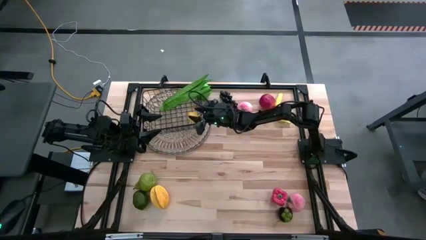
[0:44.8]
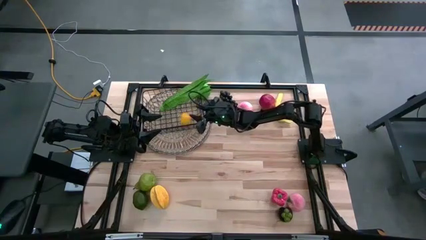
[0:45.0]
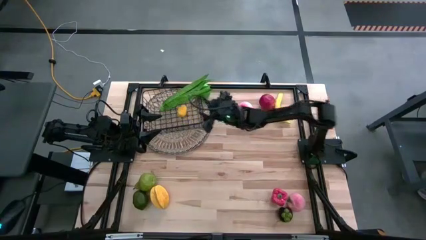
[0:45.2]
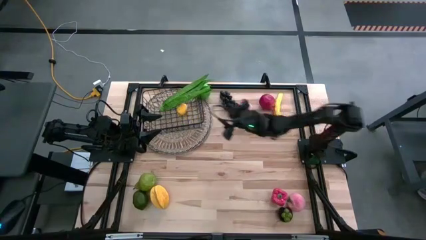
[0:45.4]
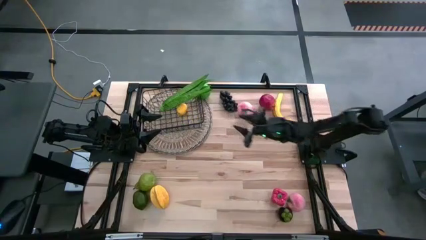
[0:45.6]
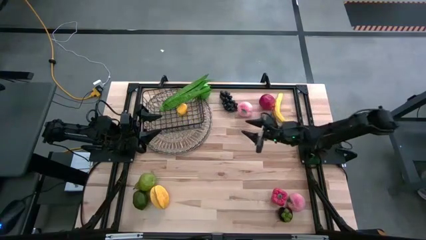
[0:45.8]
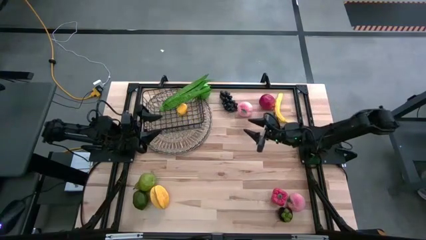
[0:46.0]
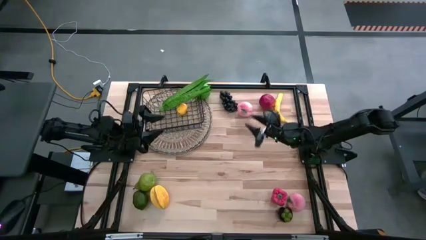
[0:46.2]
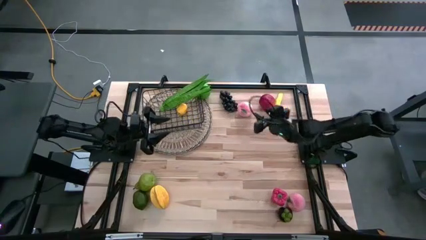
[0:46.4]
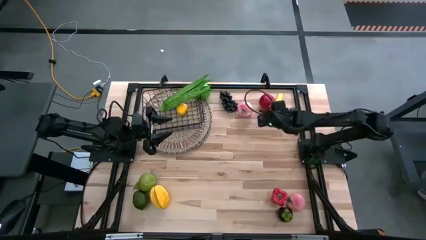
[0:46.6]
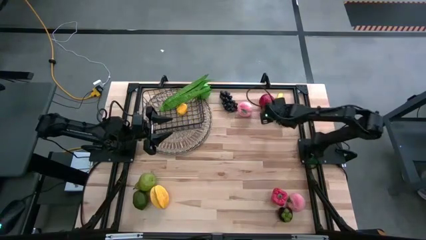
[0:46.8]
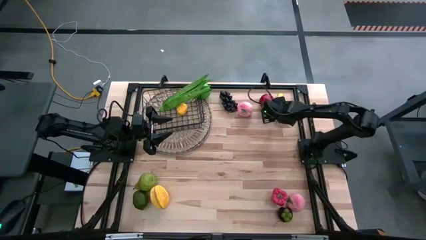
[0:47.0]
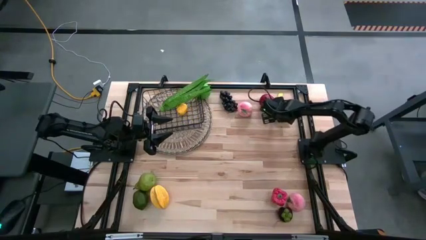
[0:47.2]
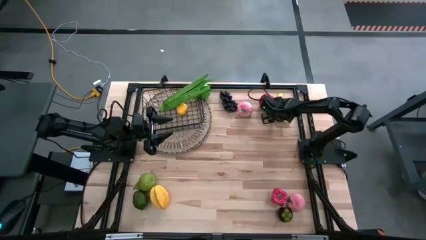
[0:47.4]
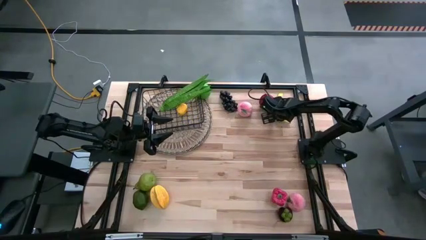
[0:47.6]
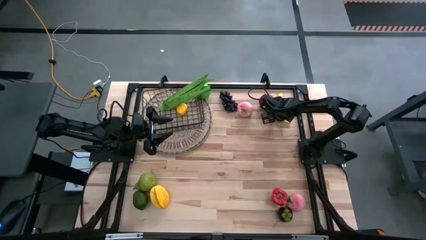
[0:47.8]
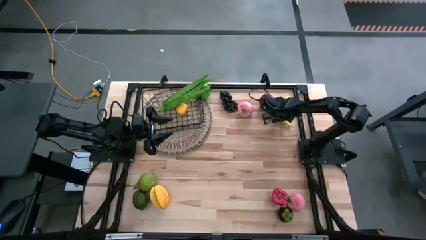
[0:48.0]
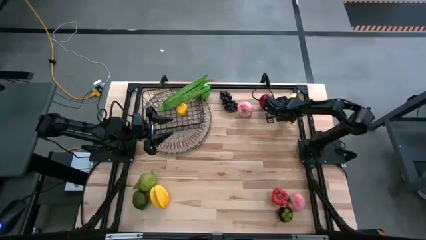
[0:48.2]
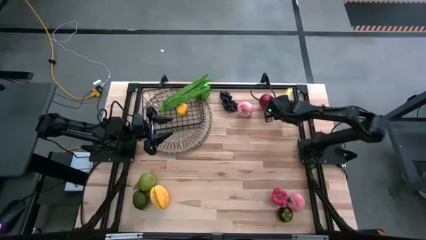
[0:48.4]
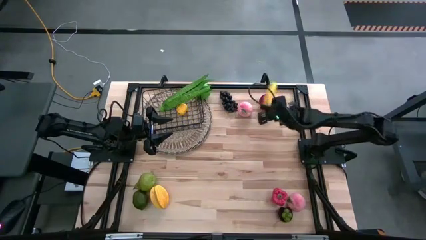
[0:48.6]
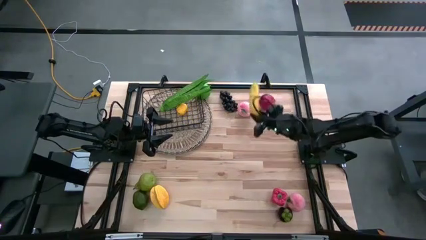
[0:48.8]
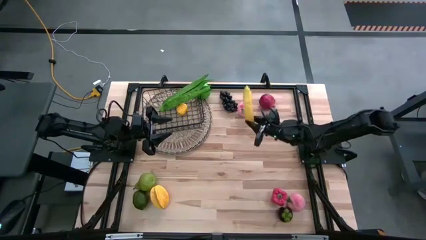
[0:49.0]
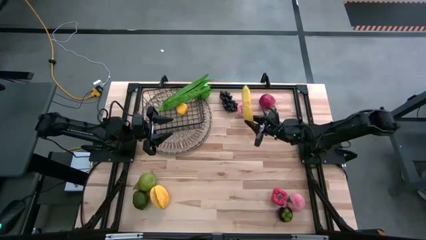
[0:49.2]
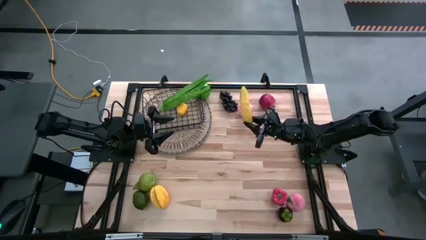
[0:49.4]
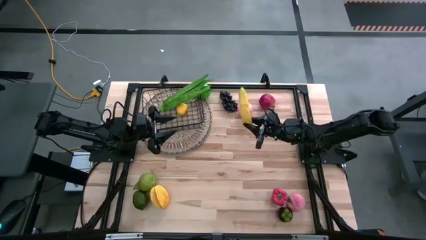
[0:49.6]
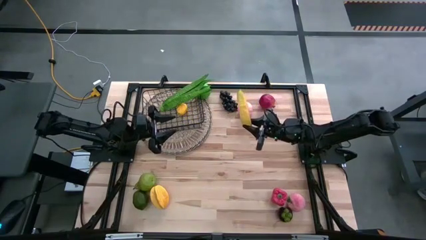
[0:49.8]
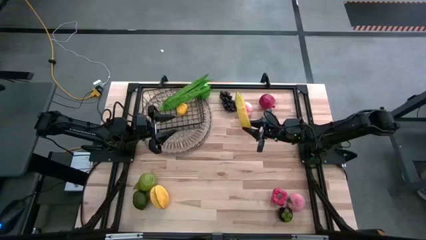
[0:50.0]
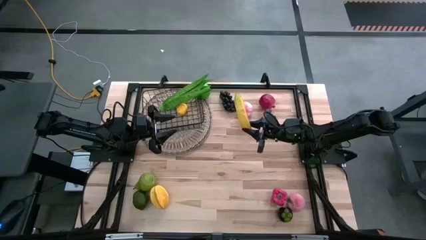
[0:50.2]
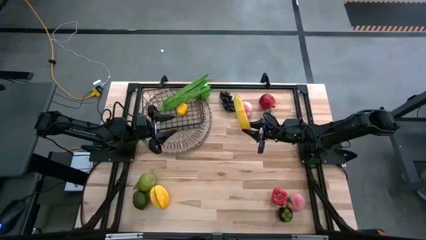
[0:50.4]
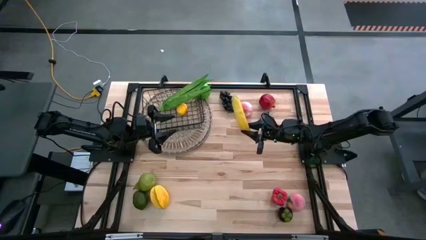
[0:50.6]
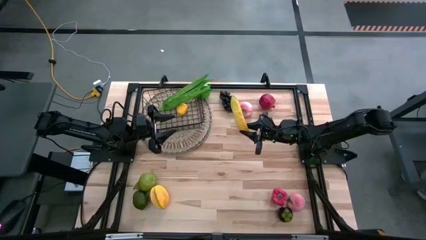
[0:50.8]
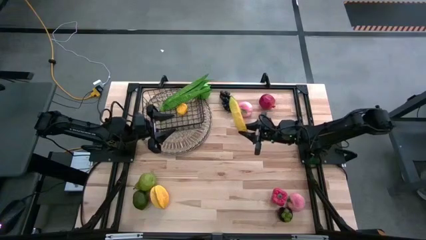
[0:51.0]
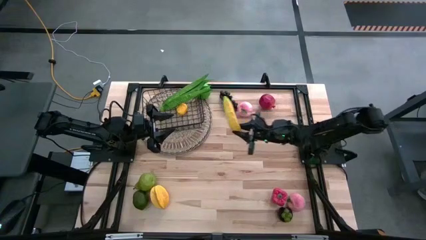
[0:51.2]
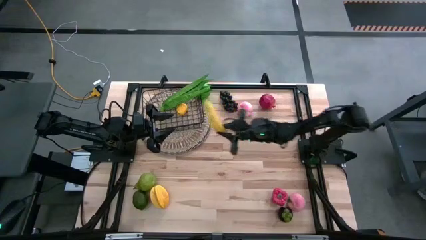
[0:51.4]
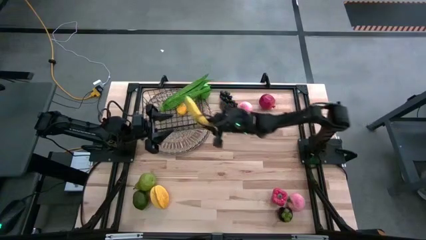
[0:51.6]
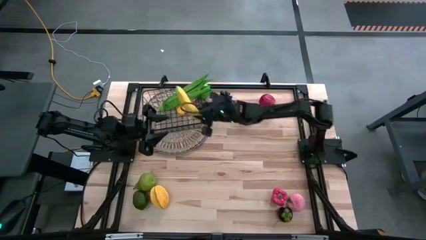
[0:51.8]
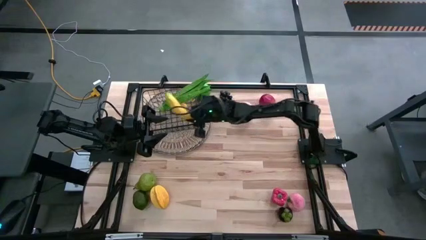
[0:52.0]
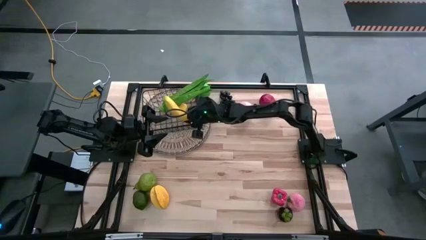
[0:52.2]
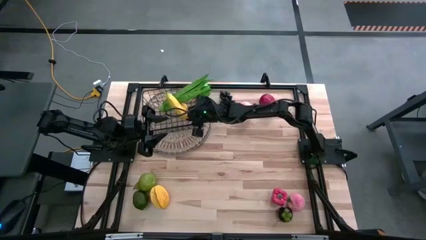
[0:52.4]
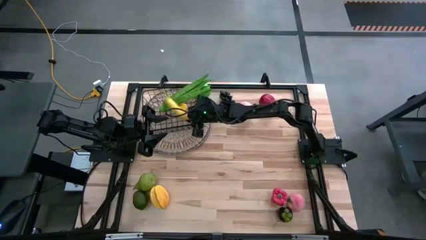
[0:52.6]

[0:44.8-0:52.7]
Task: Build produce basket
Put the yellow banana into the wire basket

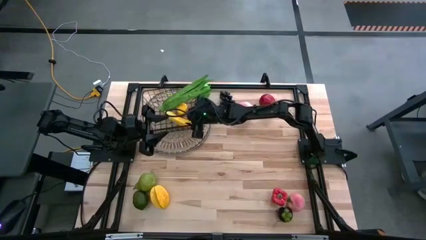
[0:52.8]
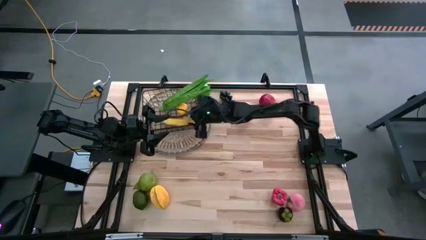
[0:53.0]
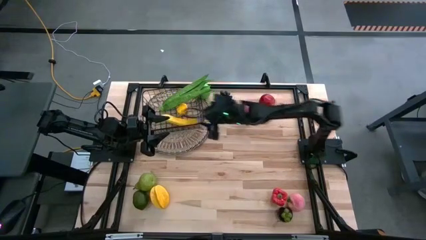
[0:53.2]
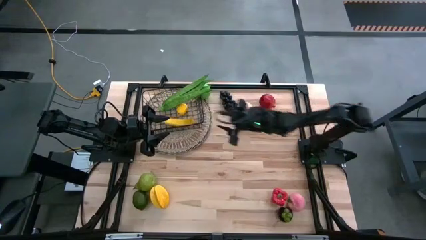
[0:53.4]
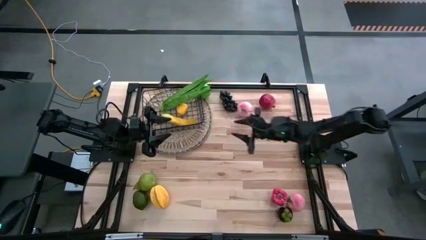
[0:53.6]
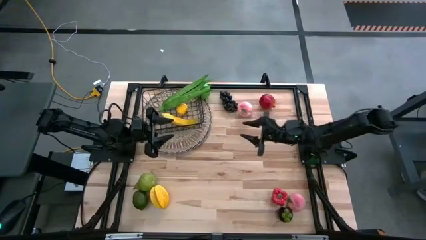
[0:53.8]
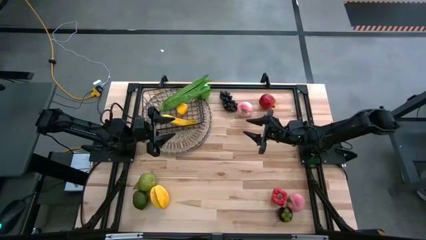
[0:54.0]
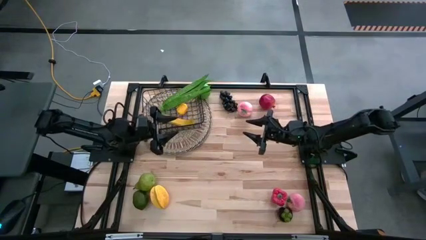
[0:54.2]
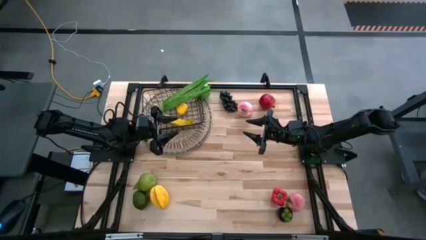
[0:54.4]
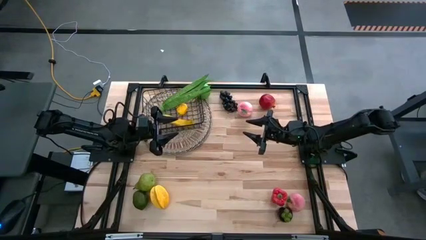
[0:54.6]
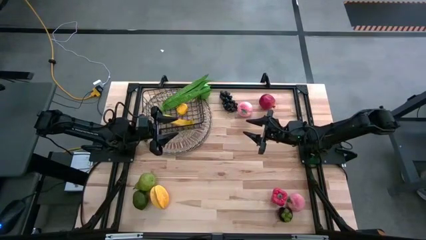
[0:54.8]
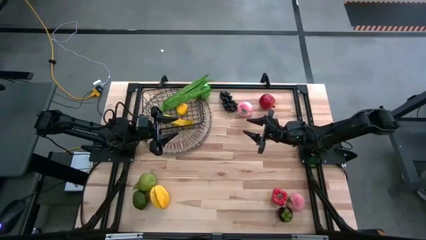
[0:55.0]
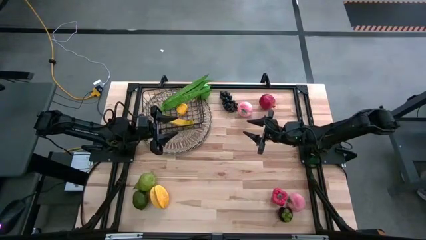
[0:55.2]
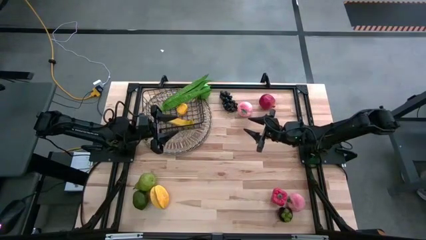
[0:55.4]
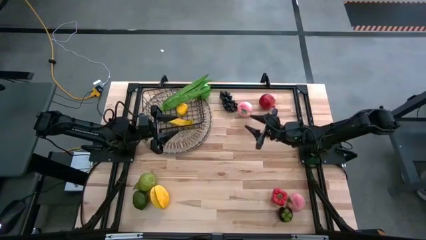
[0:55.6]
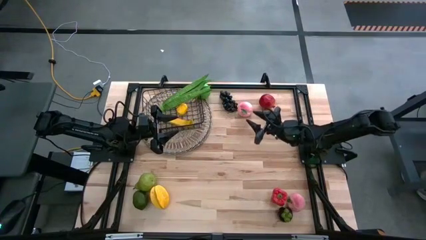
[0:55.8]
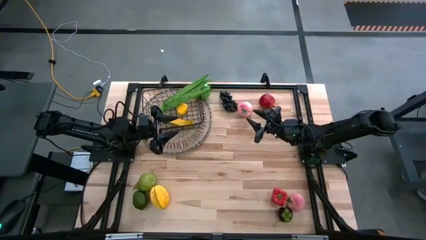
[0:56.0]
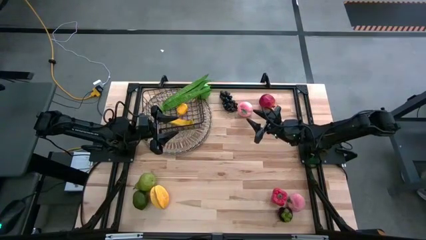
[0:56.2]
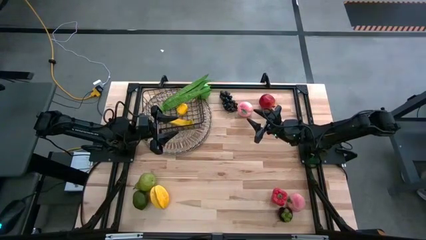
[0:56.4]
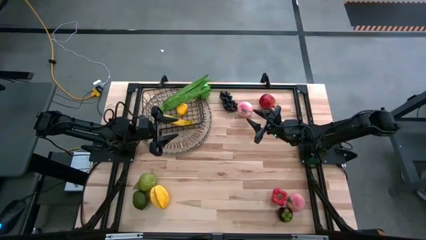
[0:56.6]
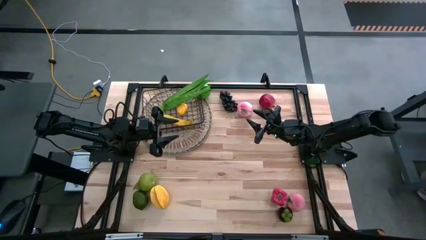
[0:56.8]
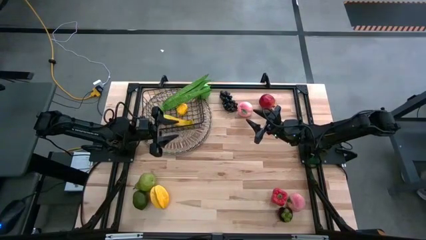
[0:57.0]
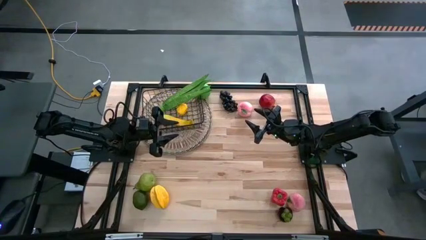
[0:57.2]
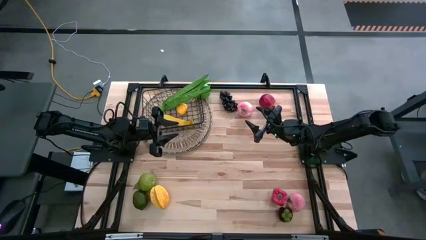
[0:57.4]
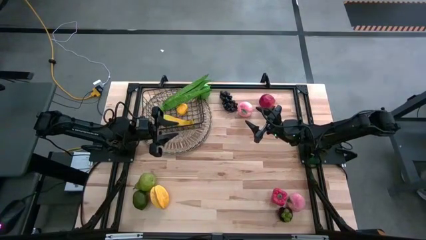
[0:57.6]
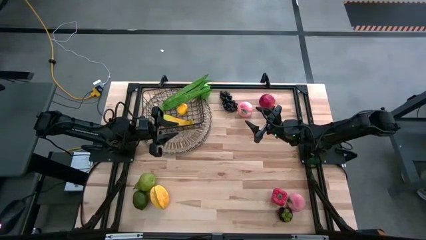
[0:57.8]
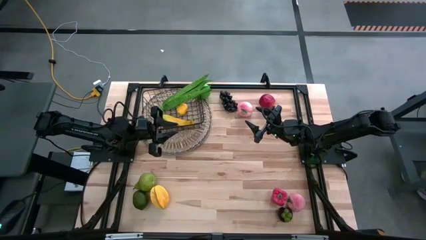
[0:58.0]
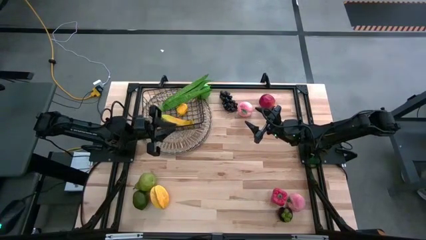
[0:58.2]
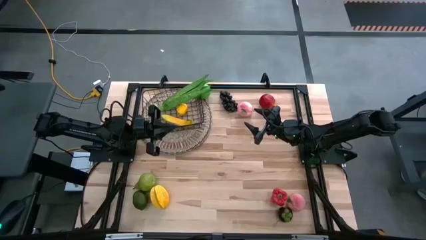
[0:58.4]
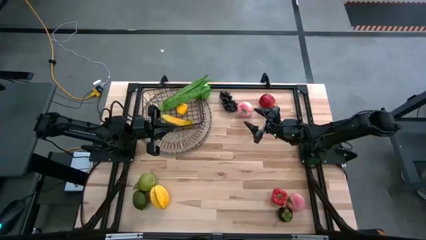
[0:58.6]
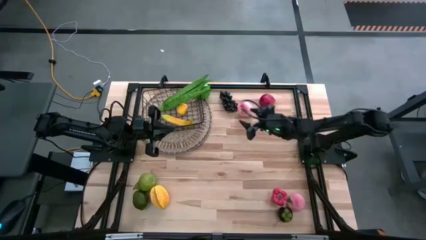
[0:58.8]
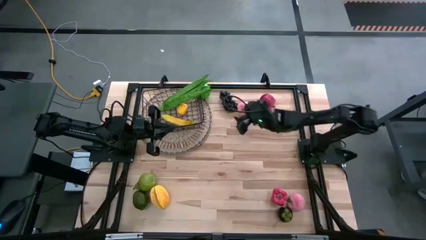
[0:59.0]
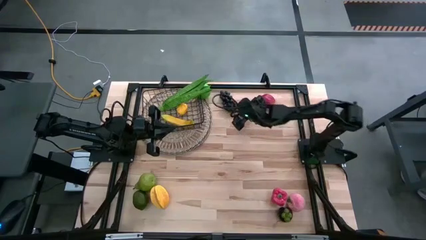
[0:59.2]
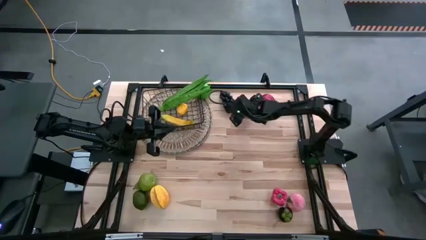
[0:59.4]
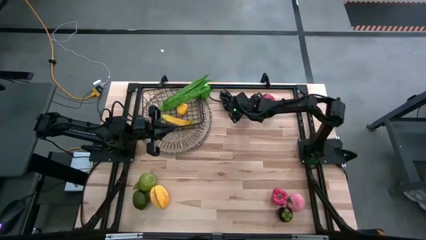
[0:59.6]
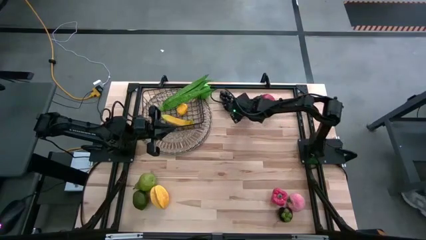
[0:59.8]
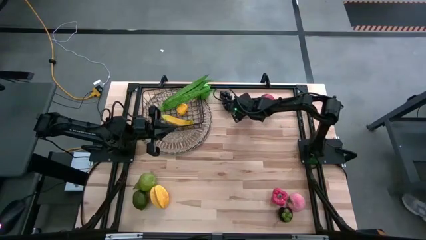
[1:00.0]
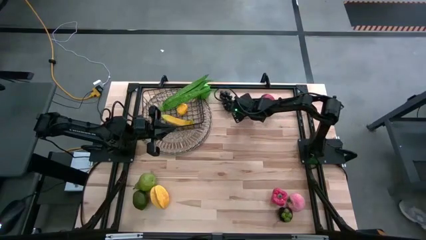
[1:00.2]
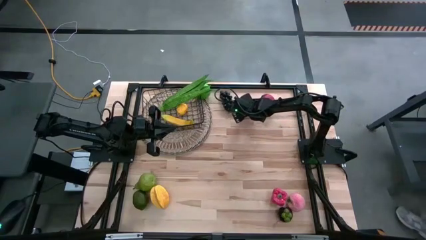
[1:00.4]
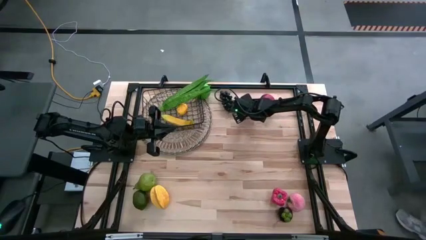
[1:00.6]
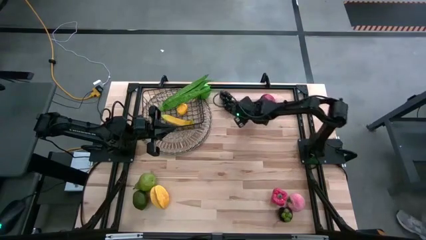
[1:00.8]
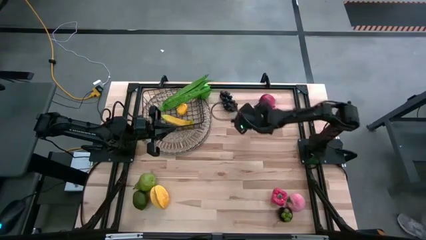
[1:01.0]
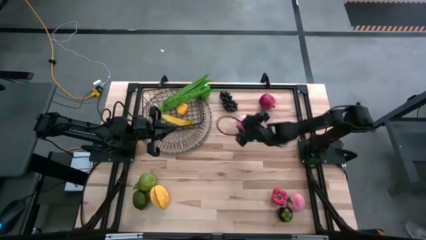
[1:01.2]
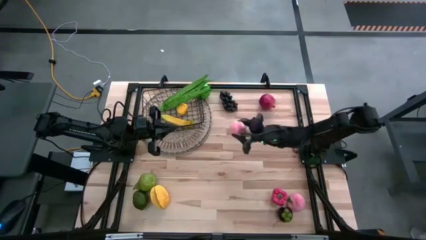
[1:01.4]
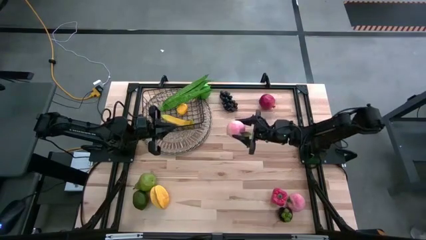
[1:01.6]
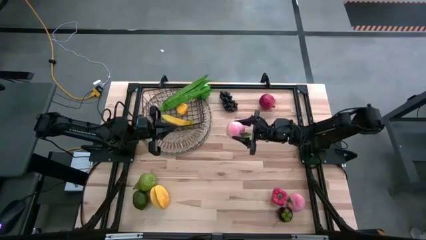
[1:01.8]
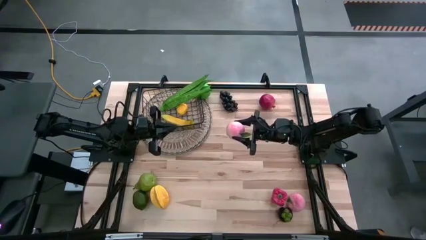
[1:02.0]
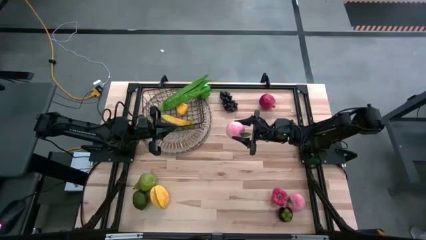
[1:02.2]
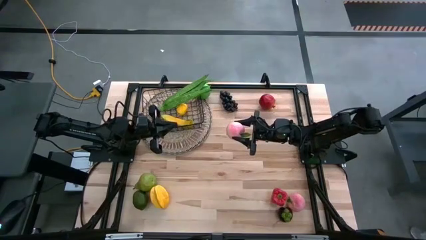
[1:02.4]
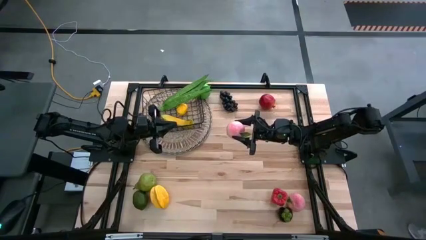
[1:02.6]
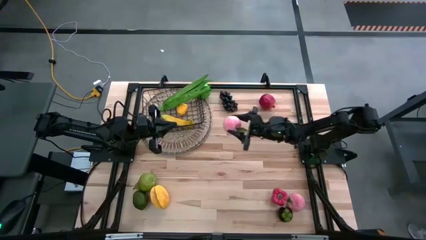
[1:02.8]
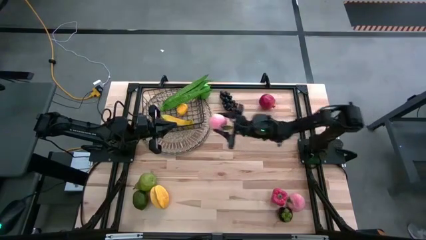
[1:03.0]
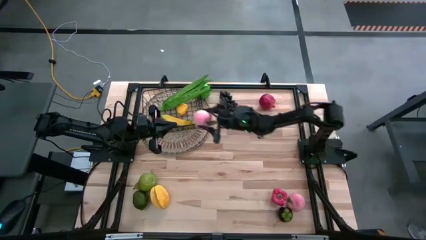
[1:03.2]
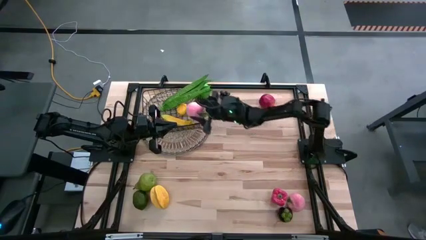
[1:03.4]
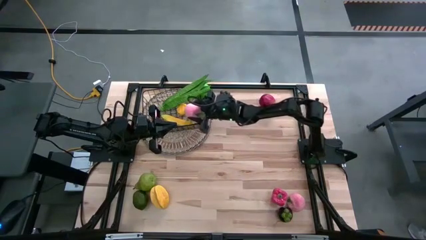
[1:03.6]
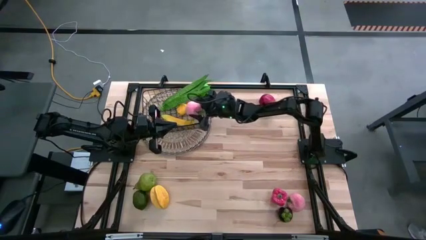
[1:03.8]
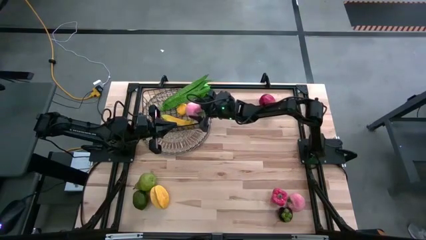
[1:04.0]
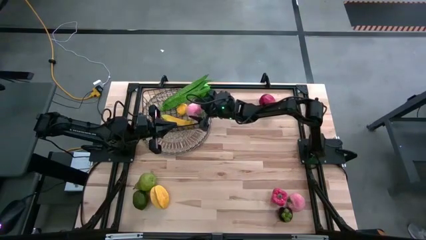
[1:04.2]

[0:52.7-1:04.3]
Put the top peach into the wire basket
